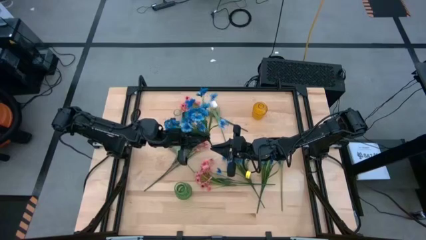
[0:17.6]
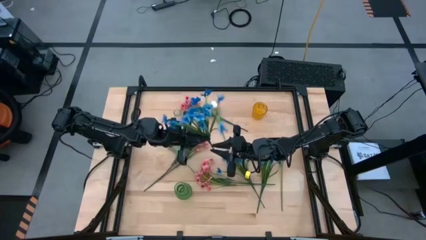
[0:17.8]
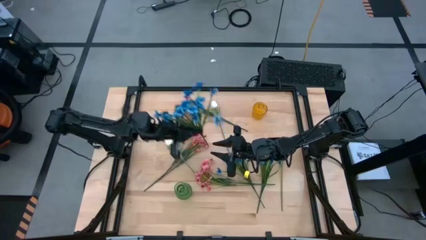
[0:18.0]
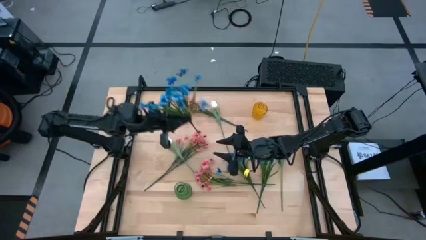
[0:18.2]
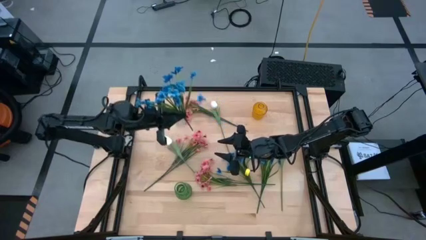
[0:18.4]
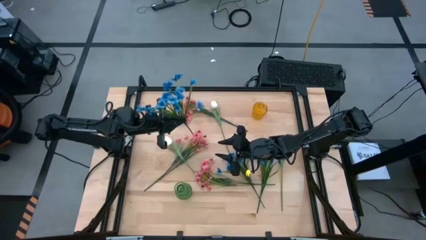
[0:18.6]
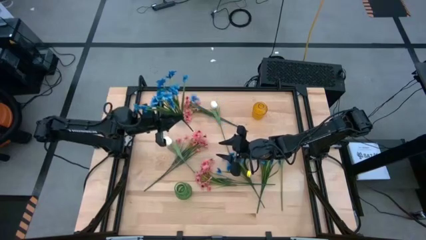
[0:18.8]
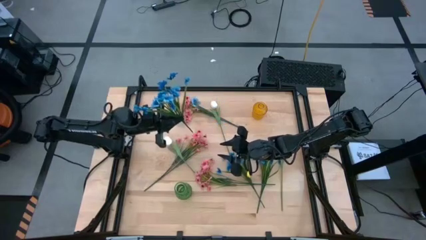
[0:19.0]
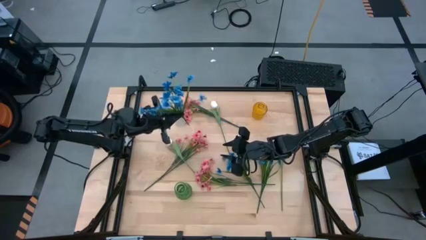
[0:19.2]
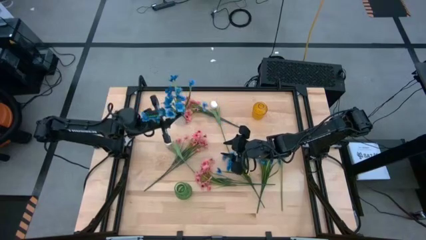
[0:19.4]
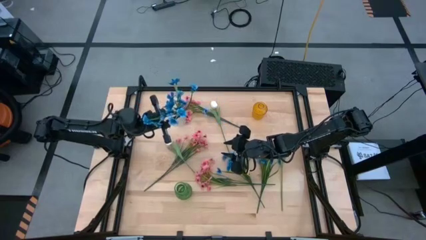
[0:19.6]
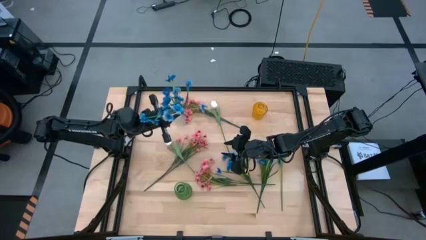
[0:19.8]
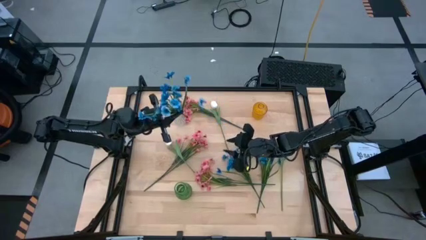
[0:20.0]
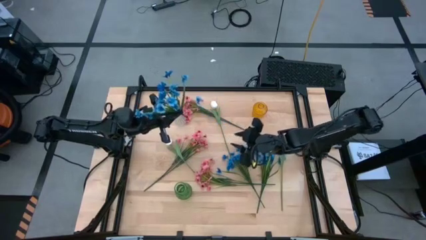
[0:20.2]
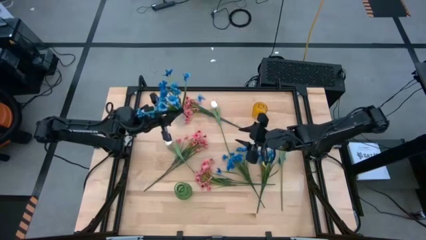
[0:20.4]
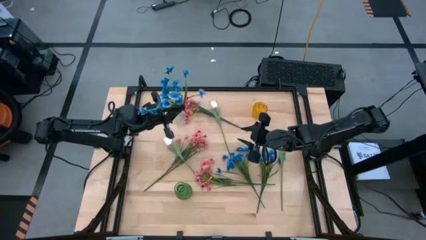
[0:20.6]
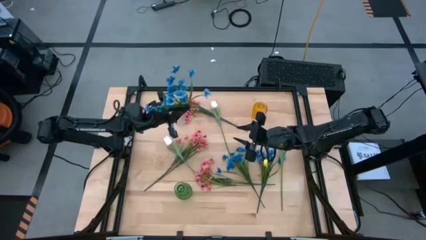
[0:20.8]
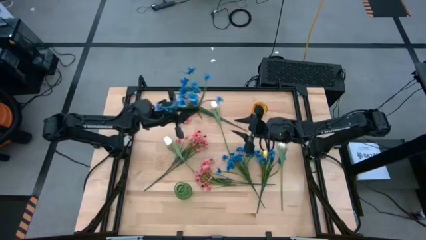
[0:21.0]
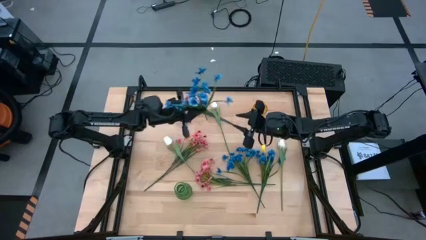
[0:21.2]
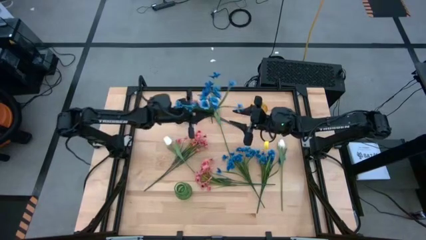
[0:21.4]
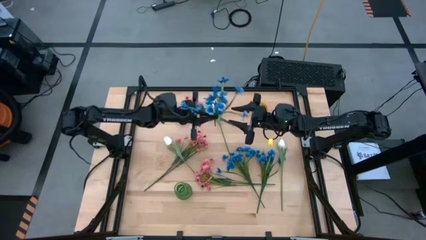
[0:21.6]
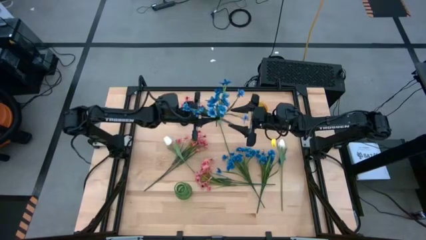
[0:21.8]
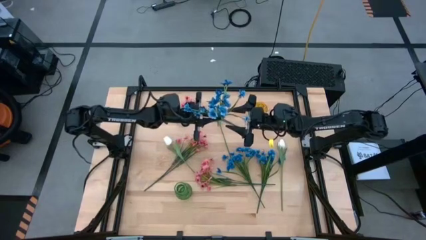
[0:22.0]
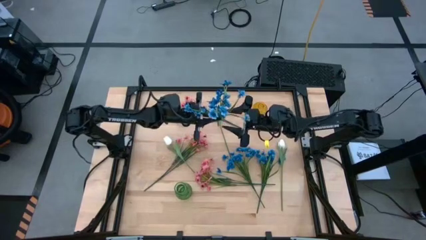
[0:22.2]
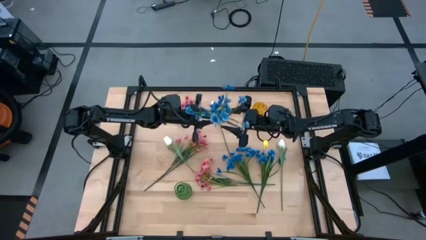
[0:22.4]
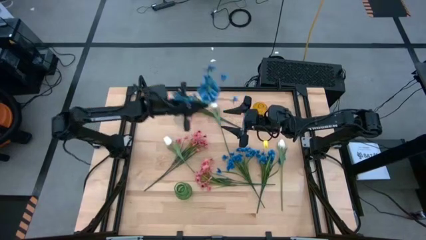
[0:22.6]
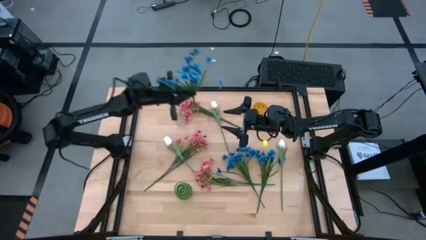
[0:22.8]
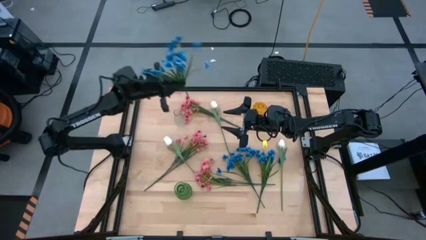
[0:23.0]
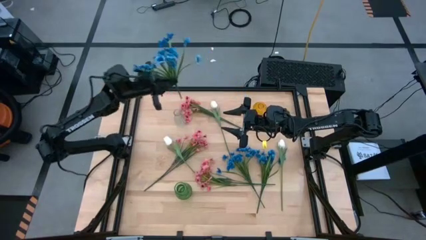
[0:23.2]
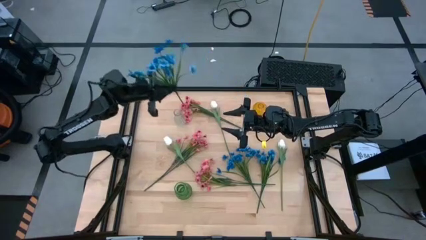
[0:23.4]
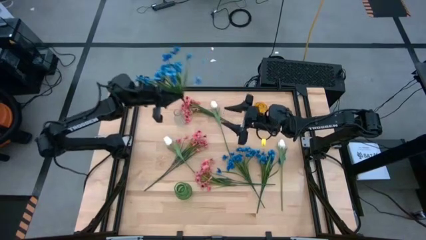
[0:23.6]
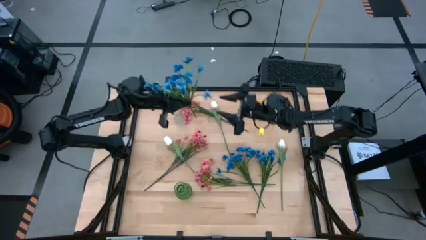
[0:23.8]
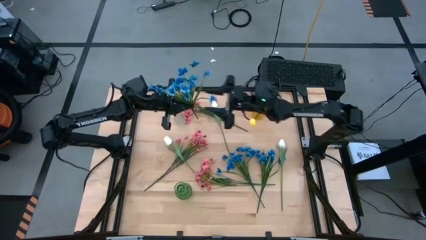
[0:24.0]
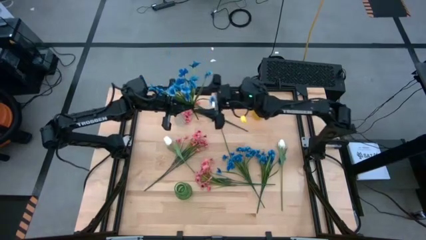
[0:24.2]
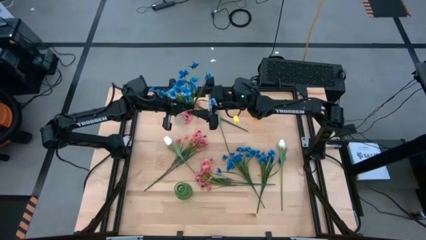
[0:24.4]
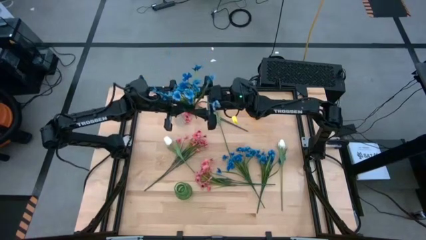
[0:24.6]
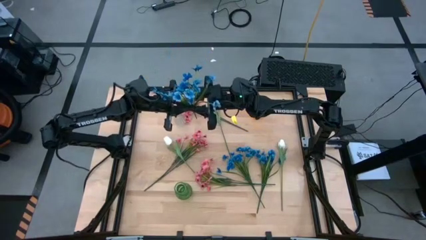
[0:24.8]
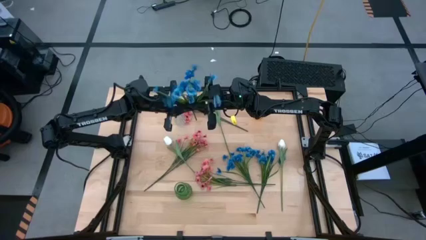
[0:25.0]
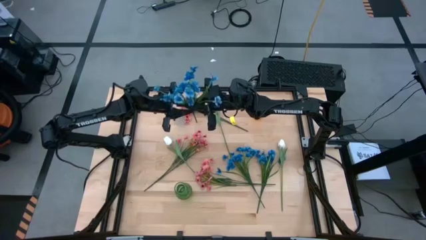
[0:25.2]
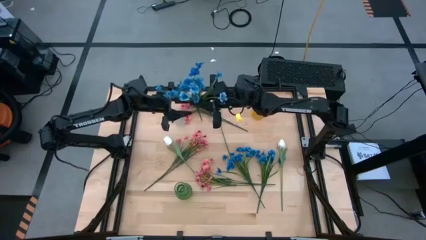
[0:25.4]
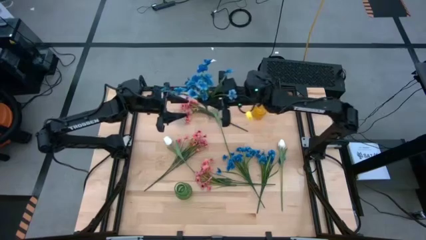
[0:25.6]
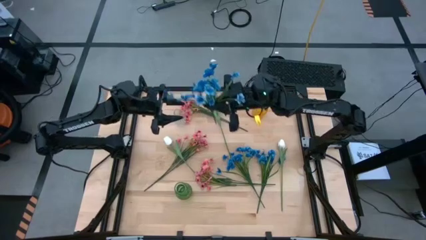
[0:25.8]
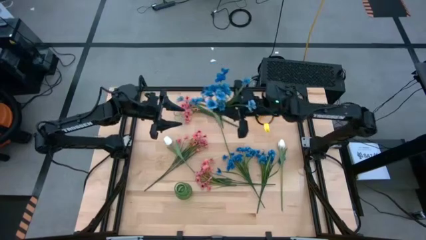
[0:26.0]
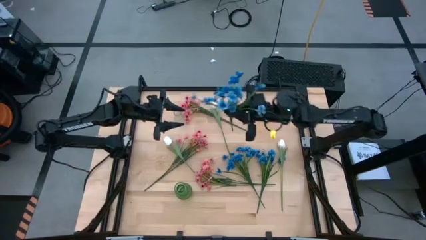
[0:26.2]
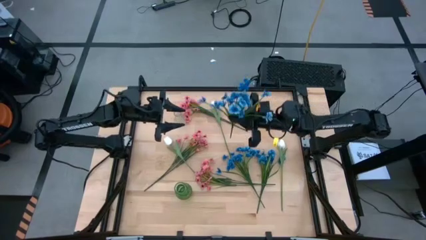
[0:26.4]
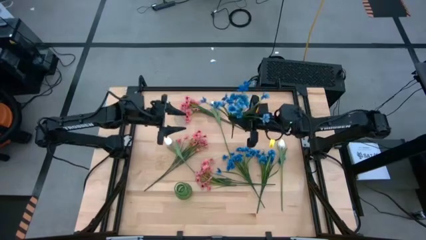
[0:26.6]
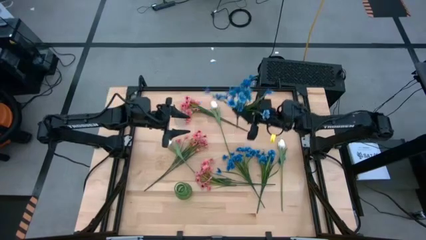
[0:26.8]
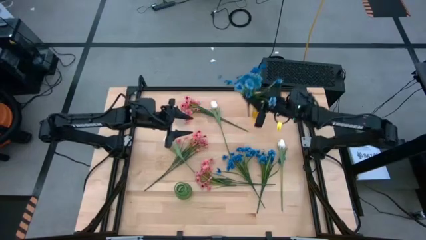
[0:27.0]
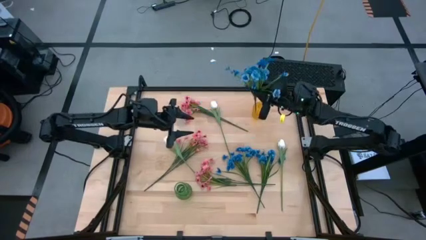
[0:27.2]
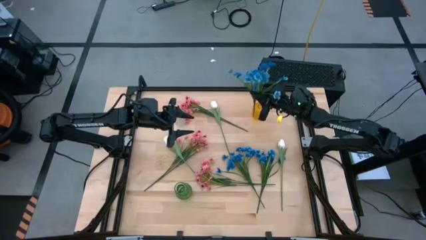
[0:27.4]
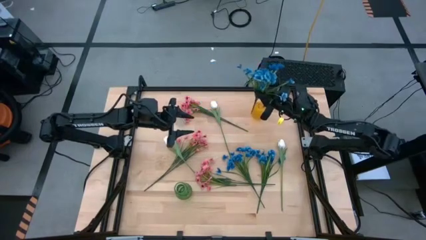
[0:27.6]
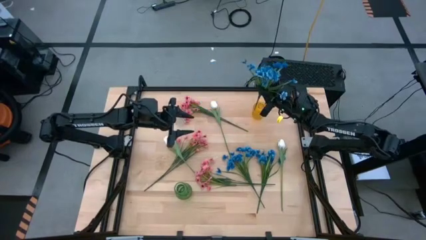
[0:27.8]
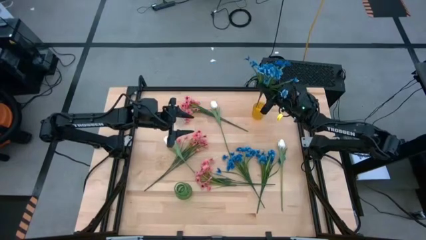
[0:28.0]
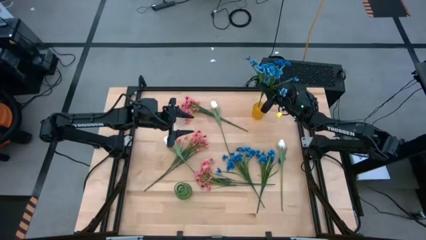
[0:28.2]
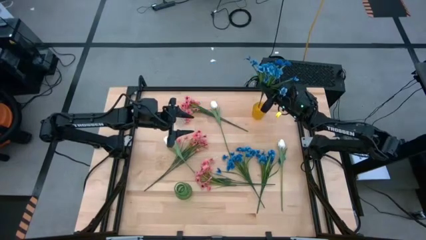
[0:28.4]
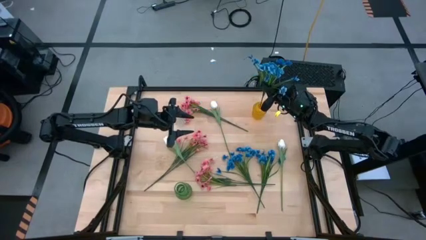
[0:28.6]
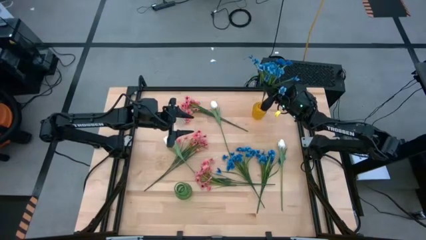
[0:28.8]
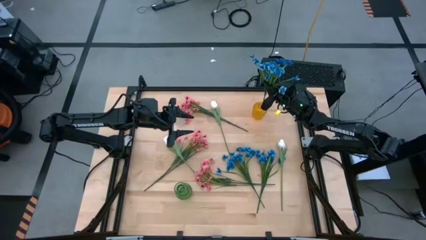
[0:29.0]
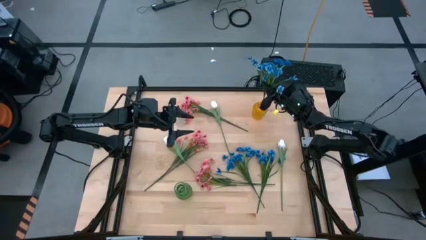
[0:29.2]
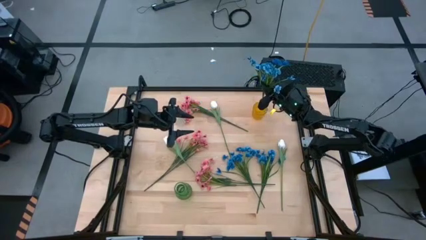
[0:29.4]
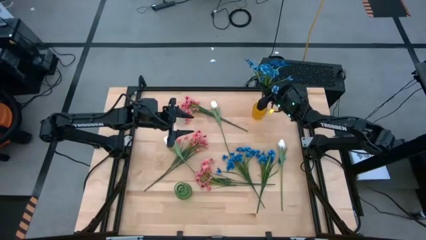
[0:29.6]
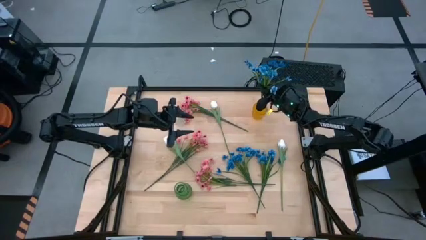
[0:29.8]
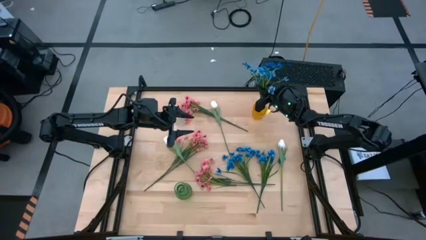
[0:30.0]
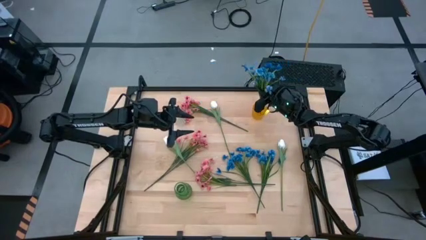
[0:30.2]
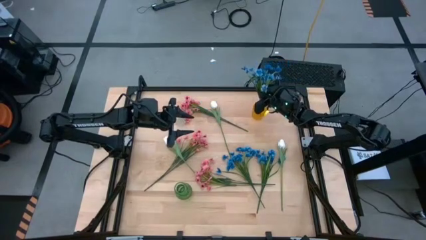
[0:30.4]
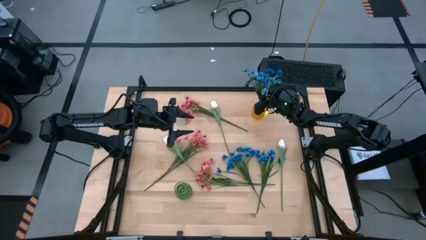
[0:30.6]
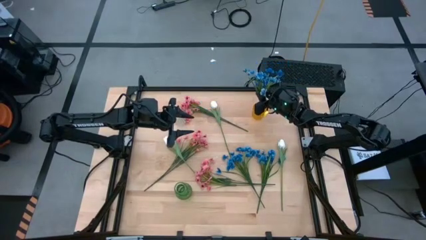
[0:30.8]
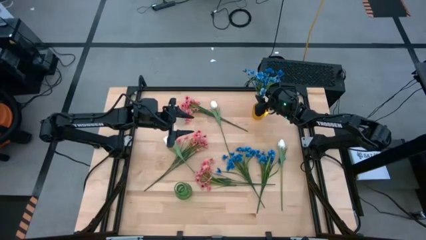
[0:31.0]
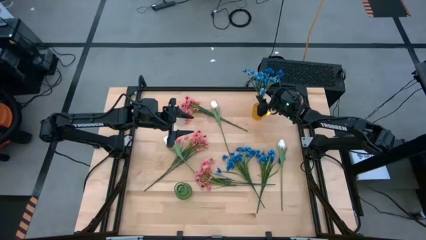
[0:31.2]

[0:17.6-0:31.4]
Task: Sort flowers into vase by color
Put the top left blue flowers into the yellow vase
